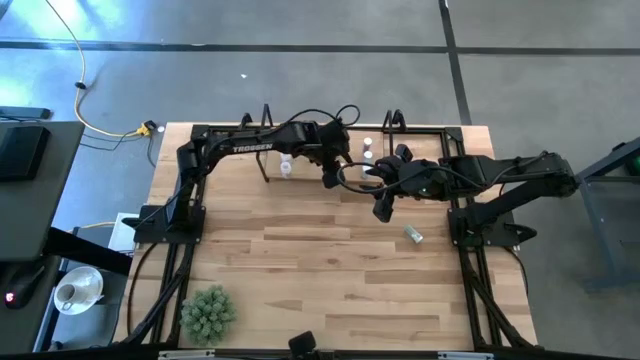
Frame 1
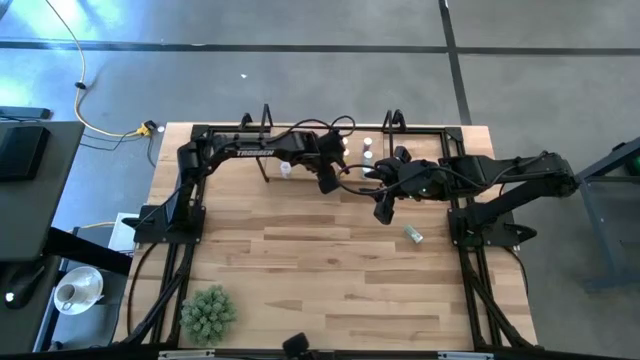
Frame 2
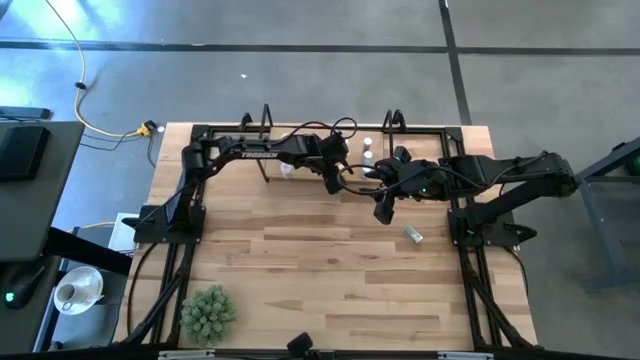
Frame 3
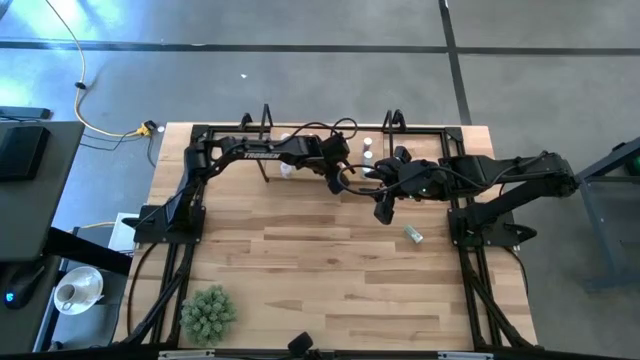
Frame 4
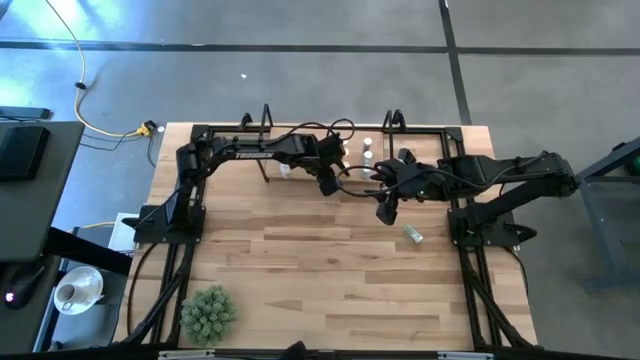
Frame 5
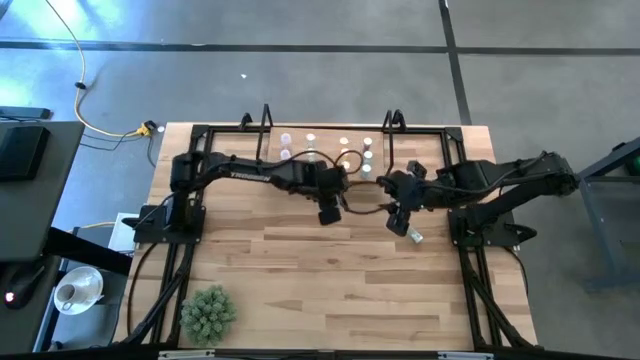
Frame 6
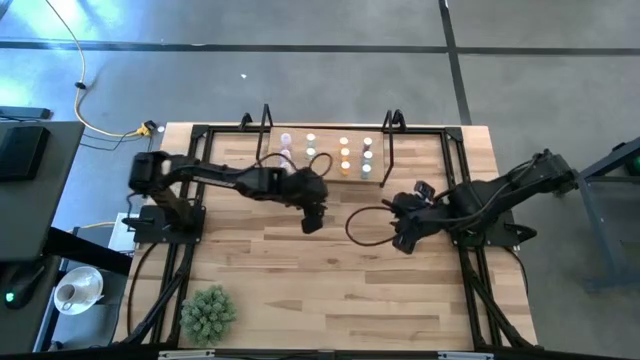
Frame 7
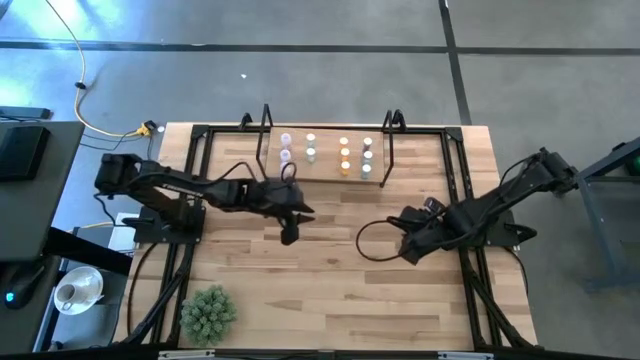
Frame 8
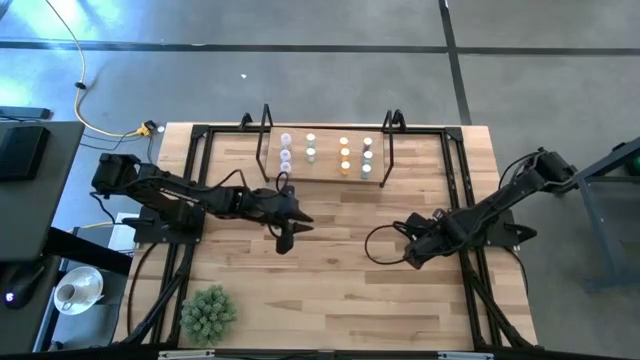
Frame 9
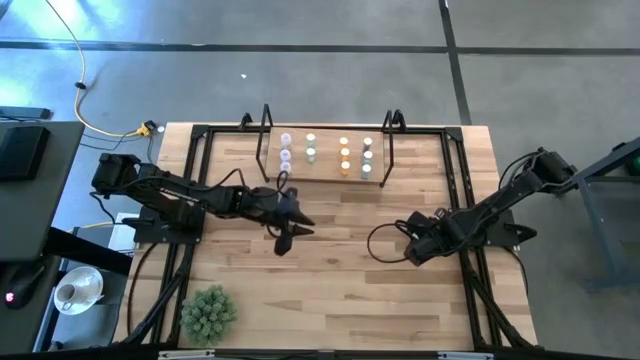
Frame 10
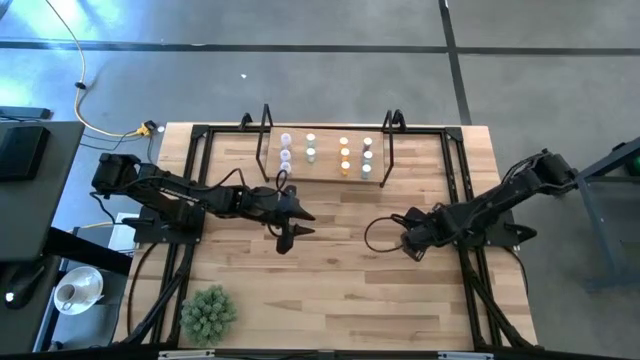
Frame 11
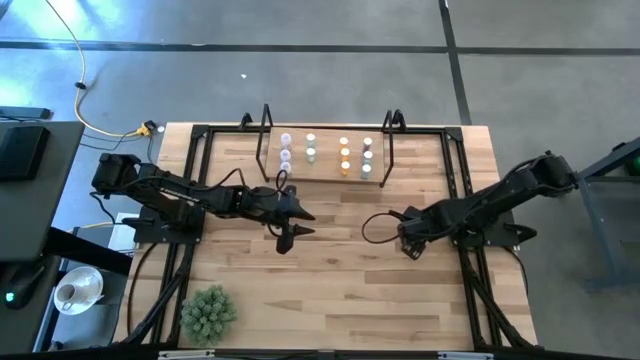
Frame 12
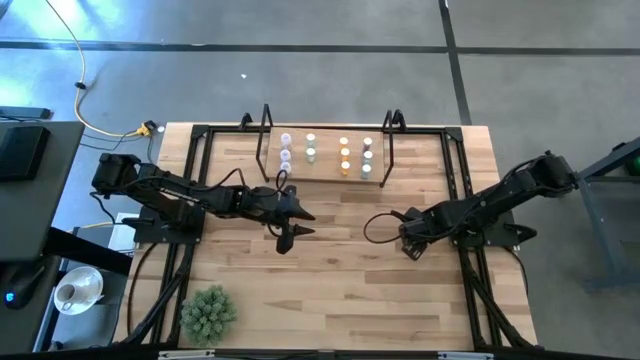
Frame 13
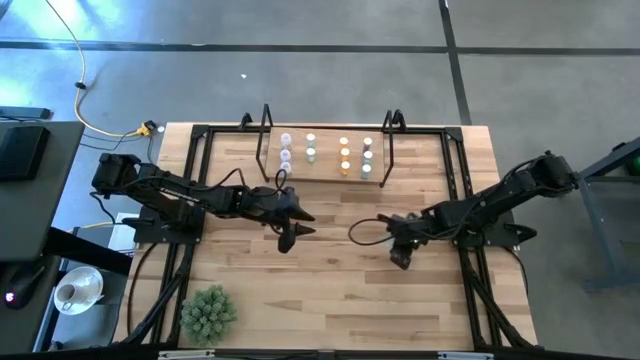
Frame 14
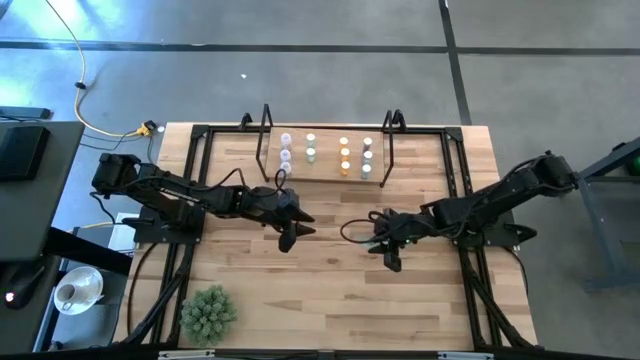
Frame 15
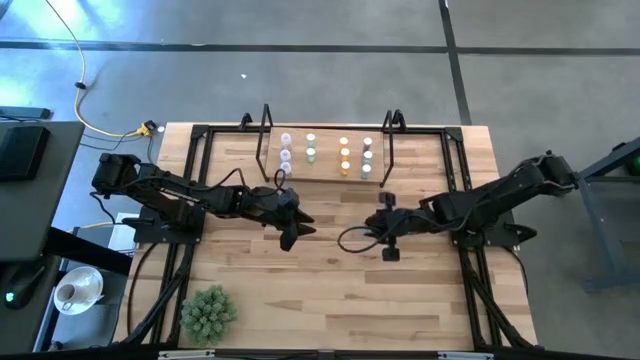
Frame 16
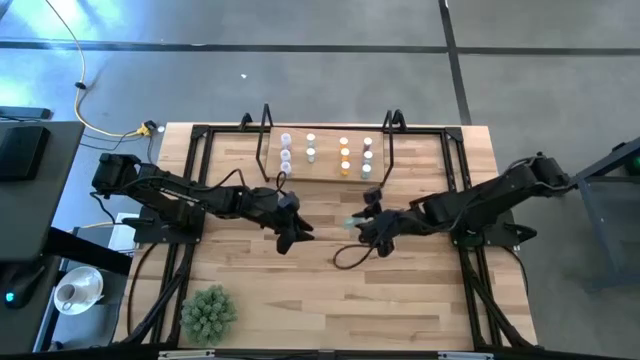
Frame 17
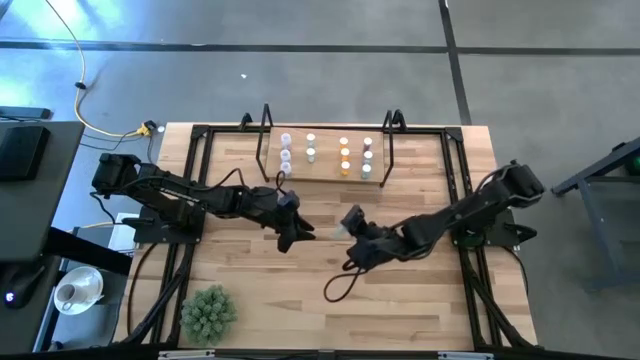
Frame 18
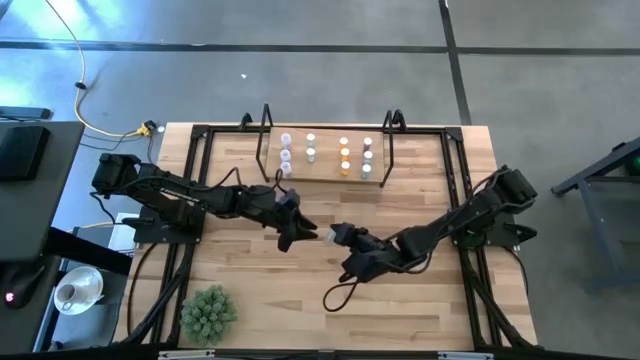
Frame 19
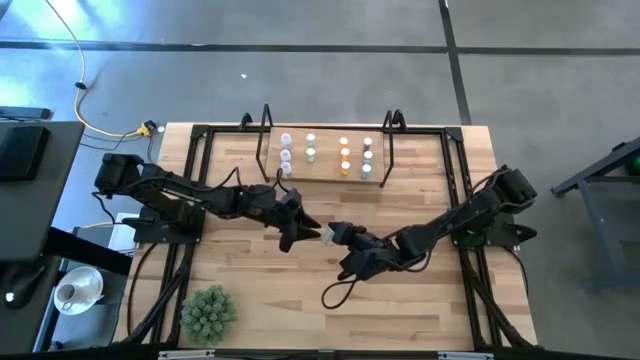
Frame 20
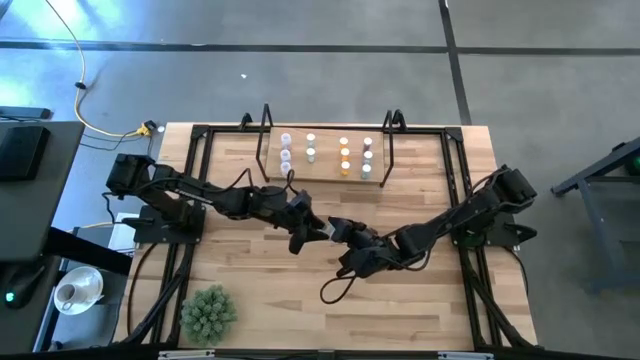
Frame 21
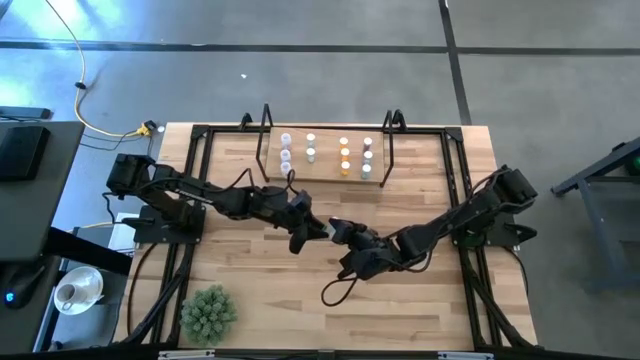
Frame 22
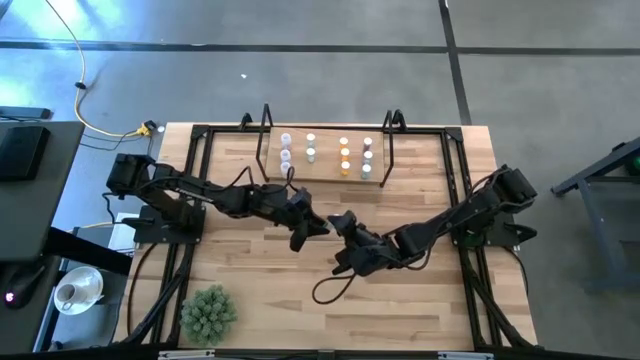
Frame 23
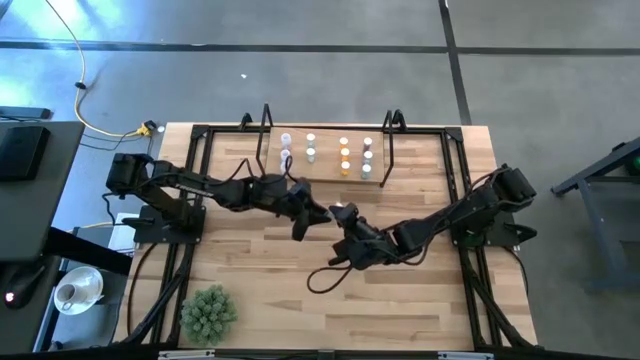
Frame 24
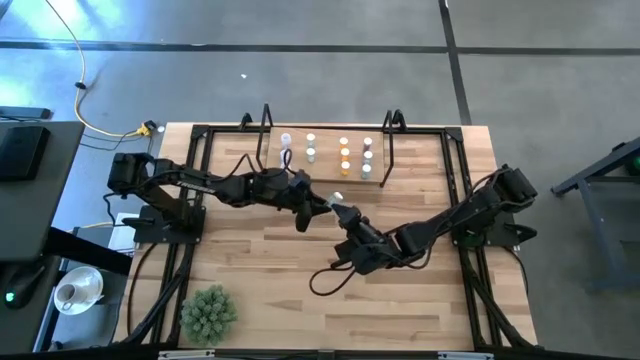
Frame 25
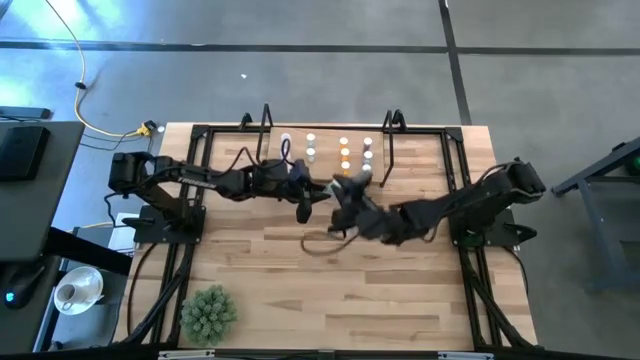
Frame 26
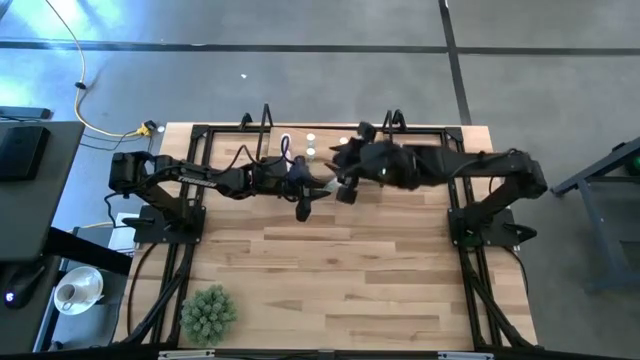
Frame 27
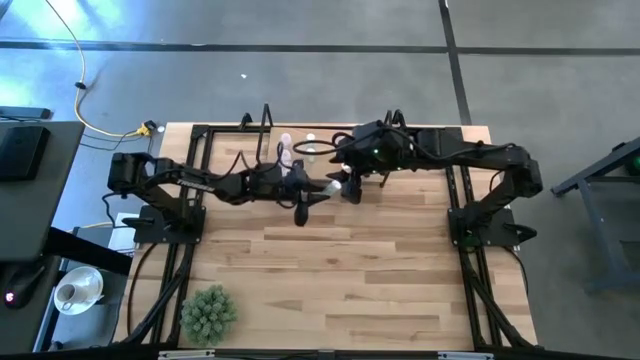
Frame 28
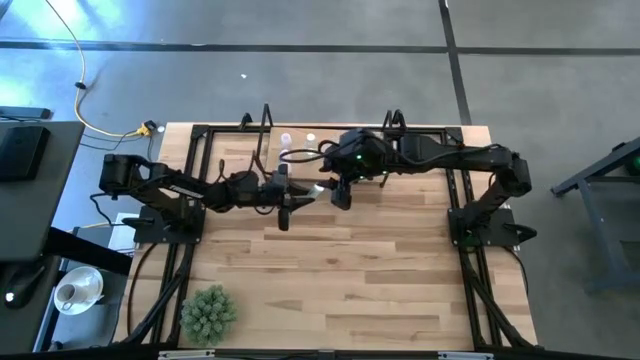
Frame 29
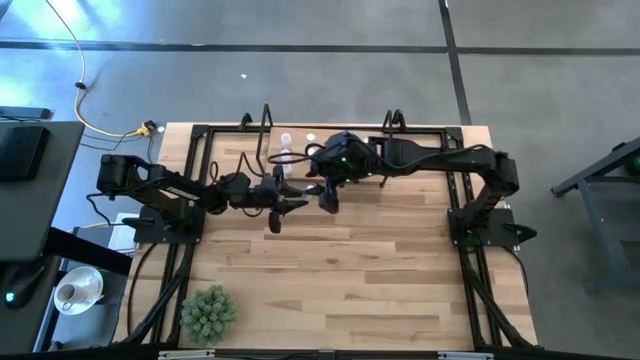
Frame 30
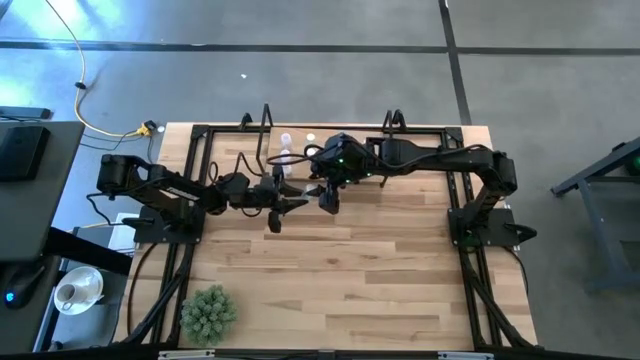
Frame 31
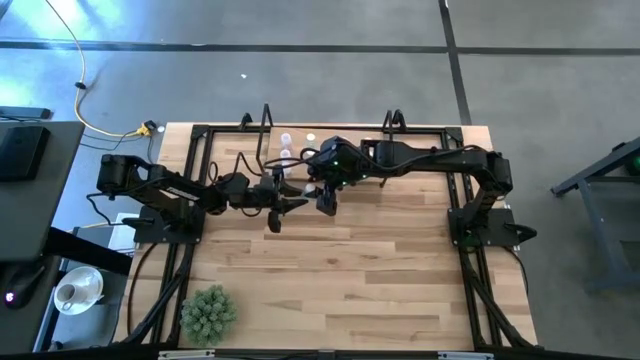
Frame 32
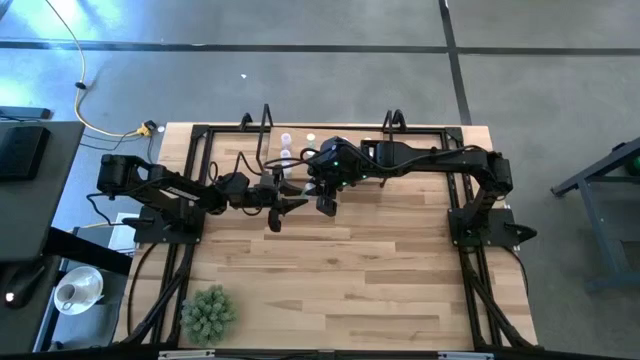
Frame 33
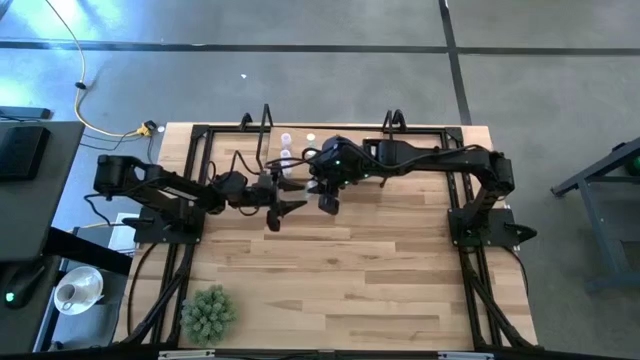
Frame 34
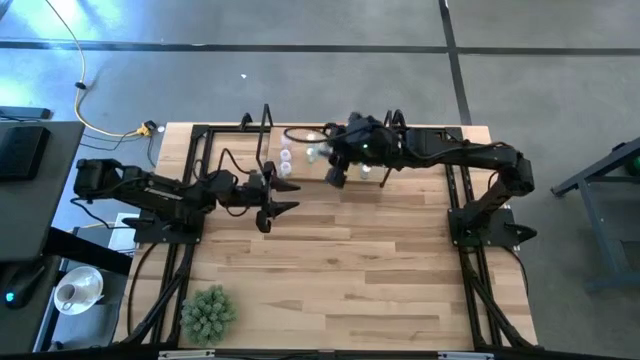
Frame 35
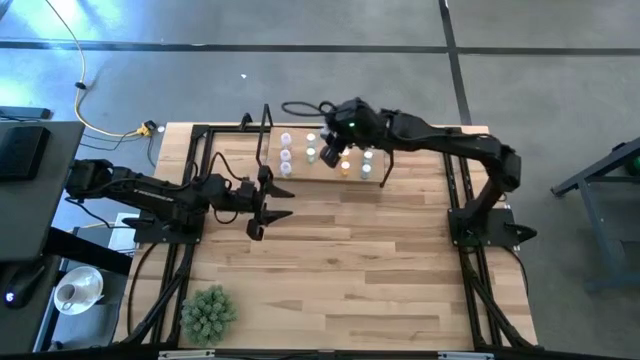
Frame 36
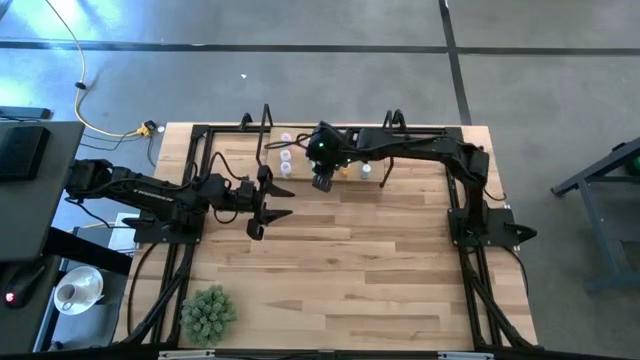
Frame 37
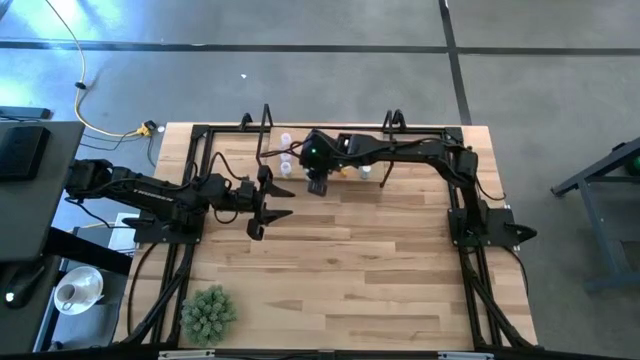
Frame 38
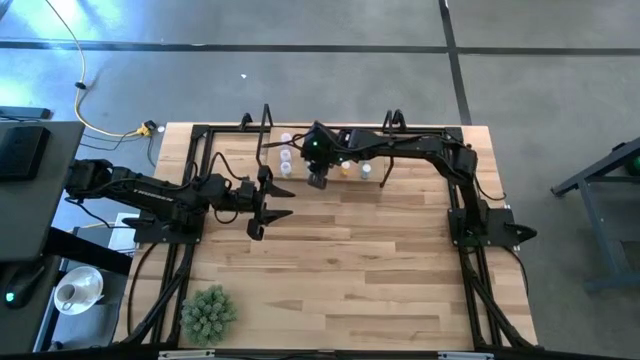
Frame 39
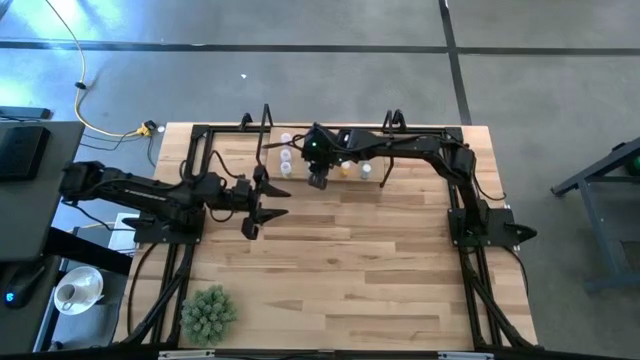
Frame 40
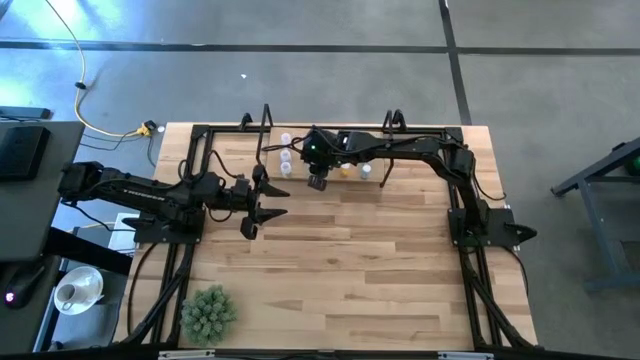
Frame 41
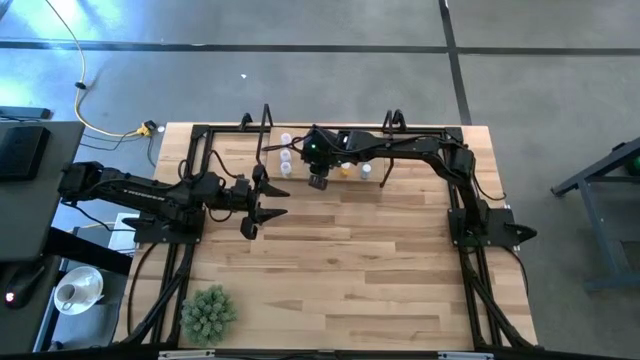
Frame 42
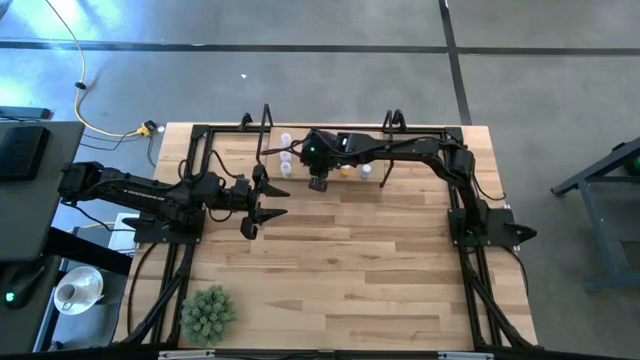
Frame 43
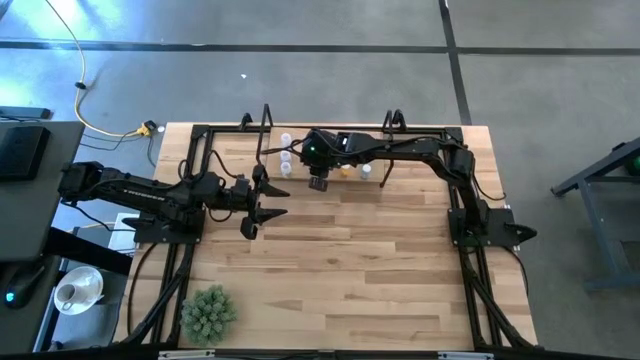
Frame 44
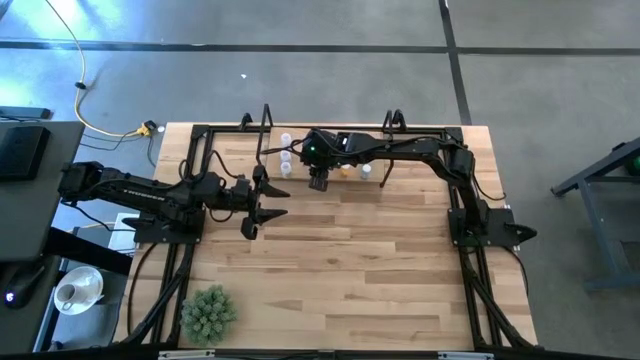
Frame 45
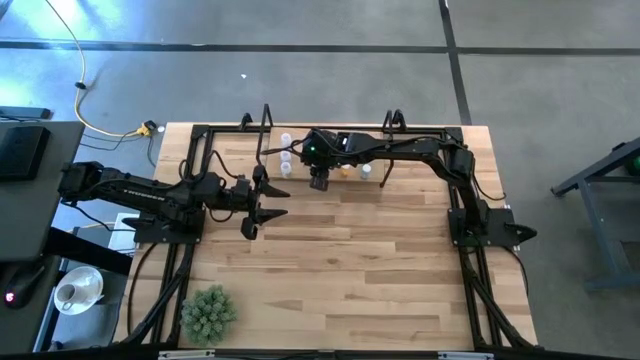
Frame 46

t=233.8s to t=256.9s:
Task: Pick and place medicine bottles onto shelf by color
Put the green pill bottle on the shelf aligned with the other green pill bottles
